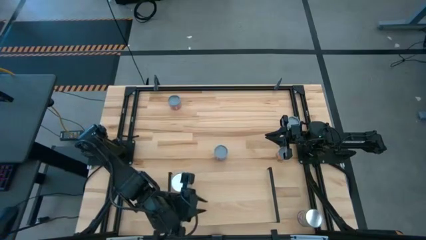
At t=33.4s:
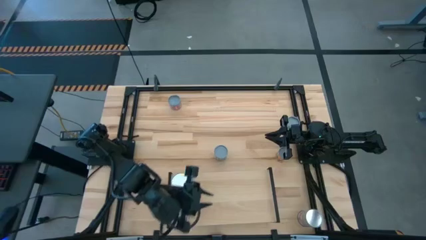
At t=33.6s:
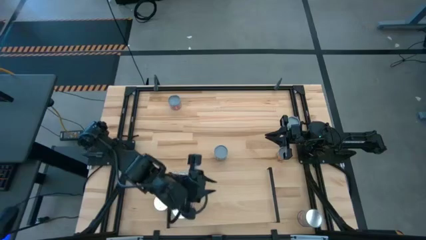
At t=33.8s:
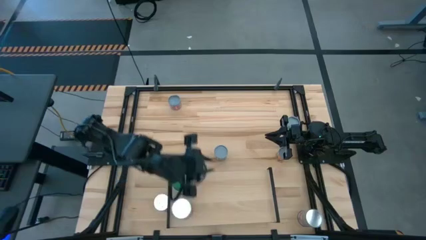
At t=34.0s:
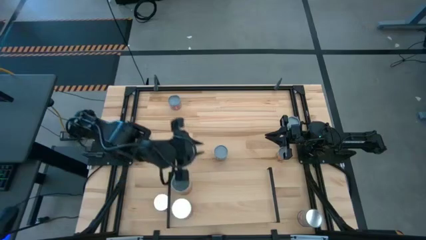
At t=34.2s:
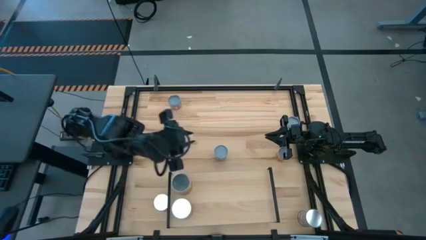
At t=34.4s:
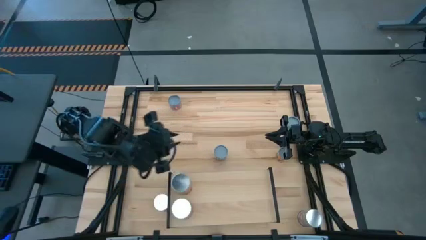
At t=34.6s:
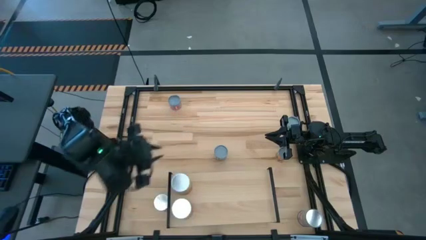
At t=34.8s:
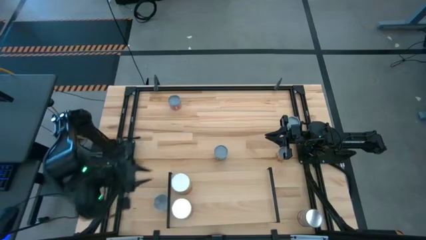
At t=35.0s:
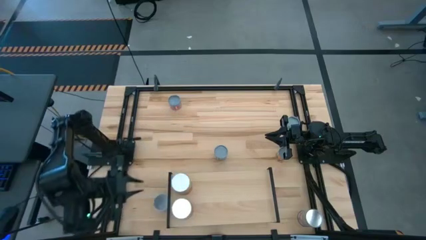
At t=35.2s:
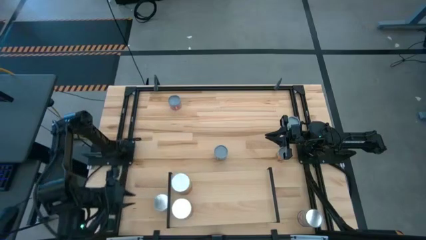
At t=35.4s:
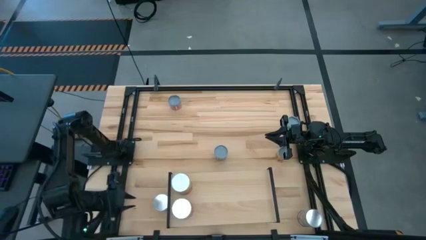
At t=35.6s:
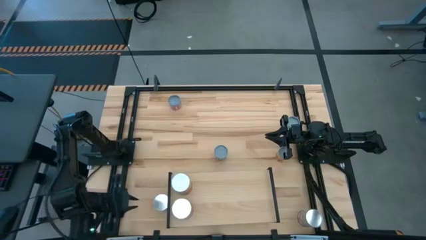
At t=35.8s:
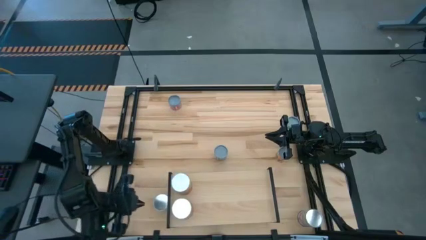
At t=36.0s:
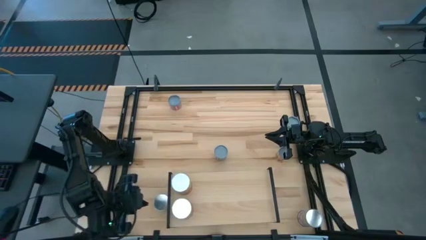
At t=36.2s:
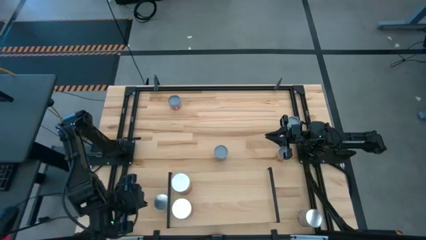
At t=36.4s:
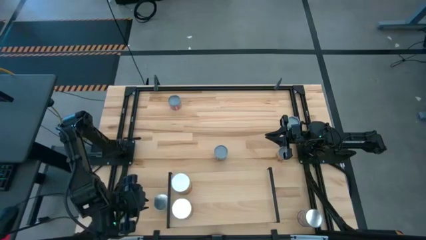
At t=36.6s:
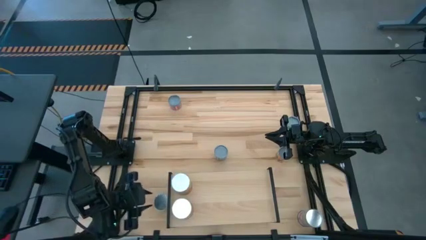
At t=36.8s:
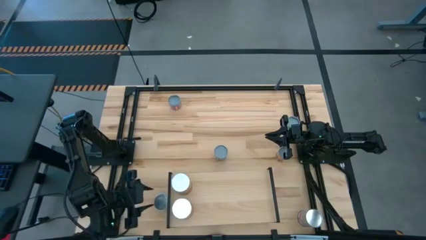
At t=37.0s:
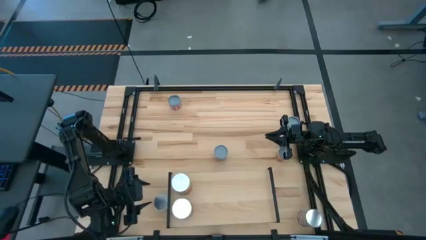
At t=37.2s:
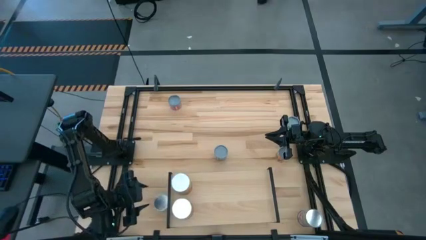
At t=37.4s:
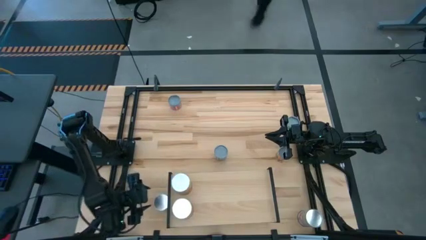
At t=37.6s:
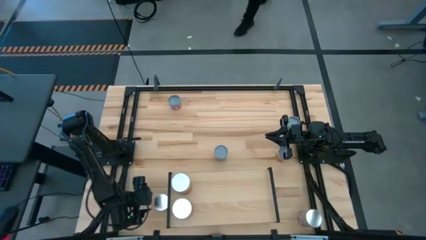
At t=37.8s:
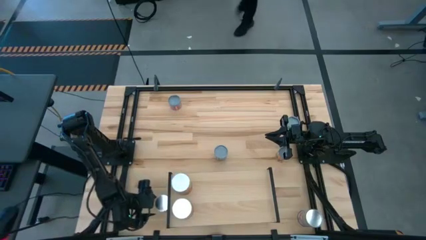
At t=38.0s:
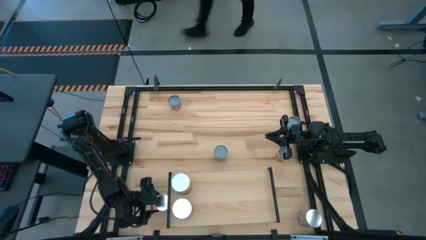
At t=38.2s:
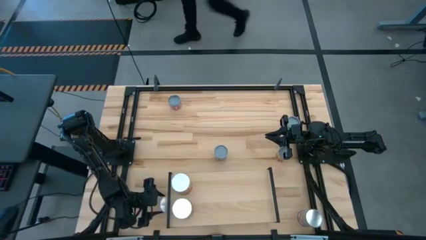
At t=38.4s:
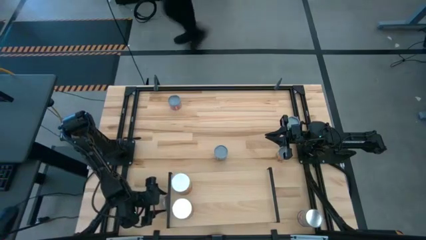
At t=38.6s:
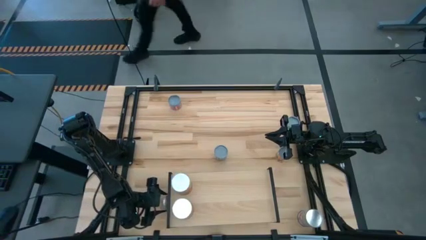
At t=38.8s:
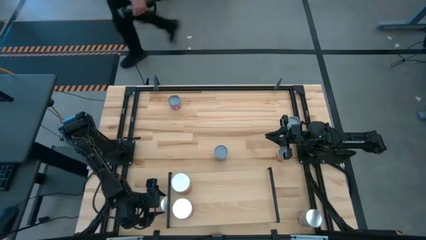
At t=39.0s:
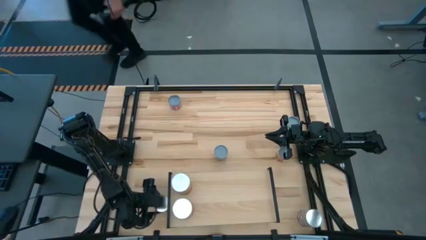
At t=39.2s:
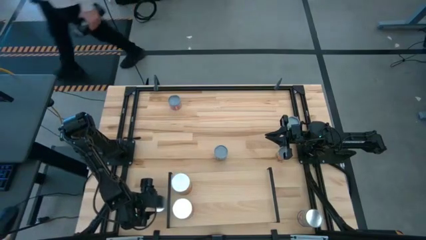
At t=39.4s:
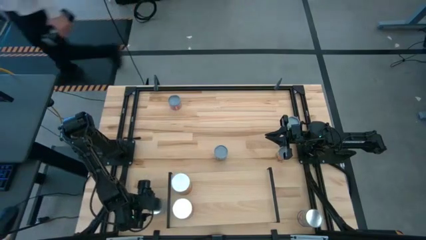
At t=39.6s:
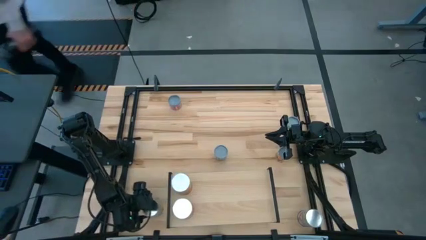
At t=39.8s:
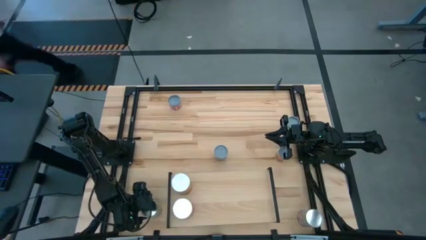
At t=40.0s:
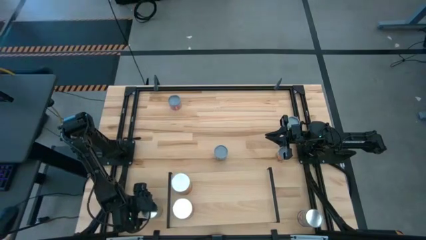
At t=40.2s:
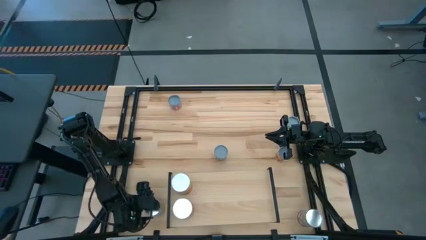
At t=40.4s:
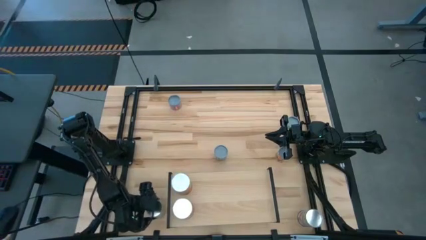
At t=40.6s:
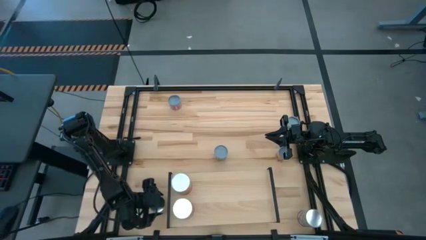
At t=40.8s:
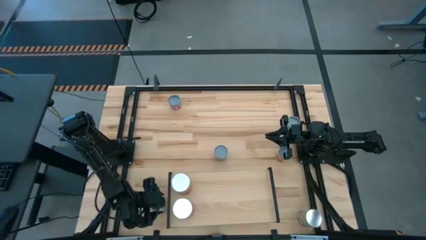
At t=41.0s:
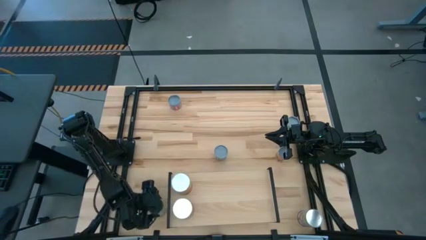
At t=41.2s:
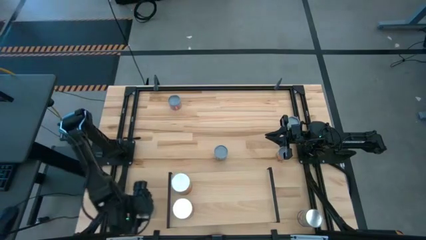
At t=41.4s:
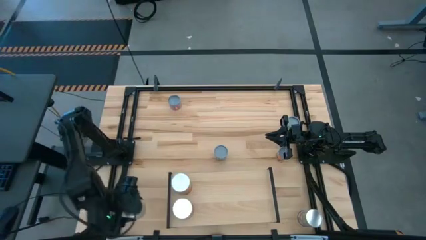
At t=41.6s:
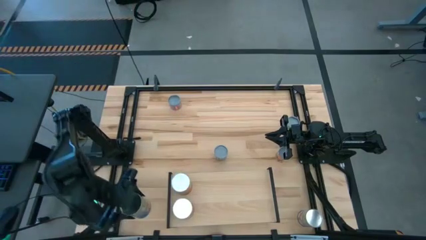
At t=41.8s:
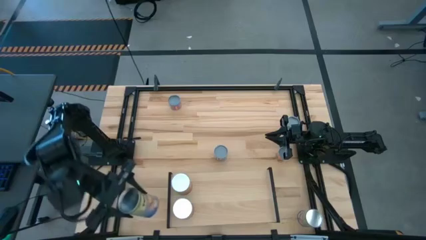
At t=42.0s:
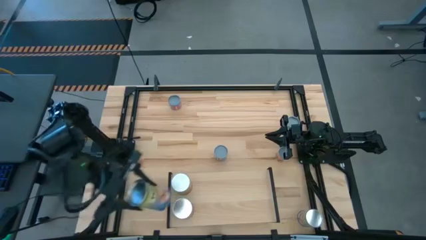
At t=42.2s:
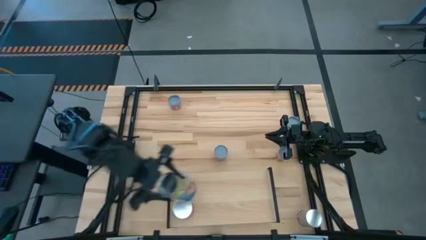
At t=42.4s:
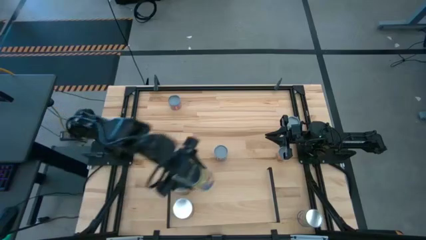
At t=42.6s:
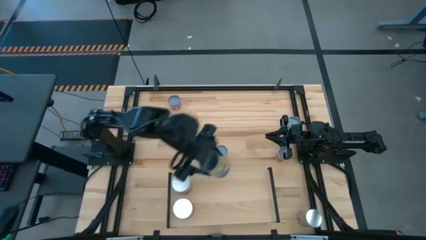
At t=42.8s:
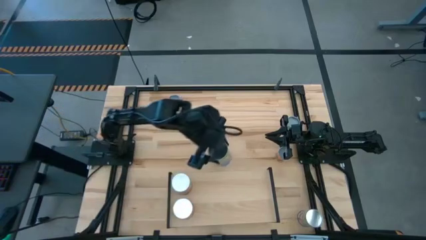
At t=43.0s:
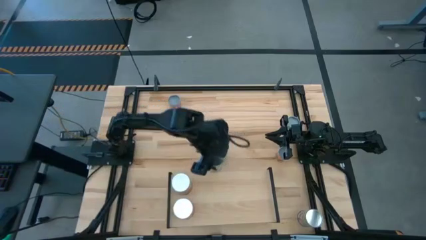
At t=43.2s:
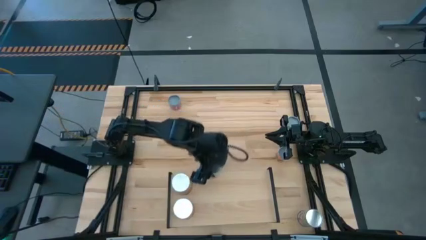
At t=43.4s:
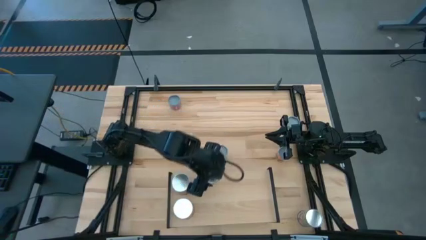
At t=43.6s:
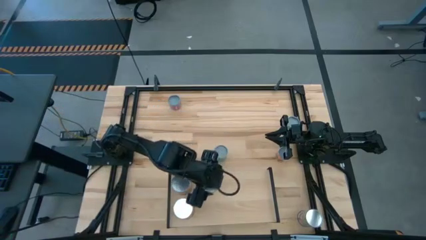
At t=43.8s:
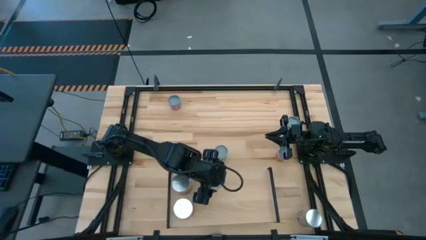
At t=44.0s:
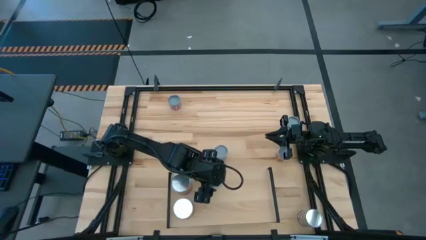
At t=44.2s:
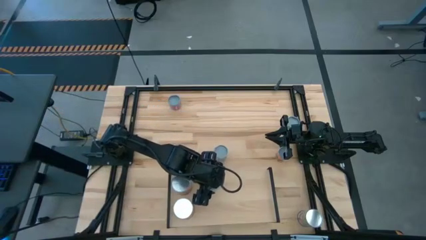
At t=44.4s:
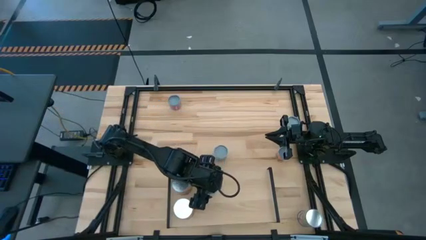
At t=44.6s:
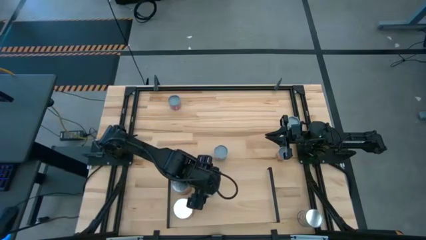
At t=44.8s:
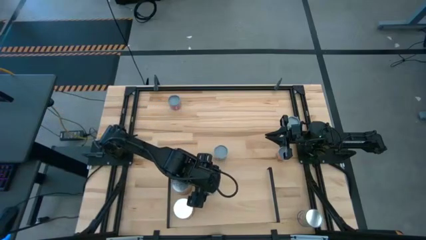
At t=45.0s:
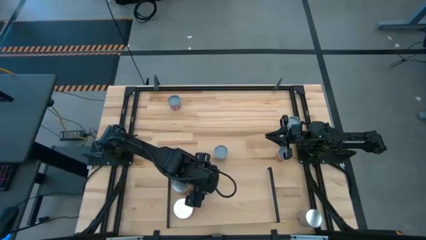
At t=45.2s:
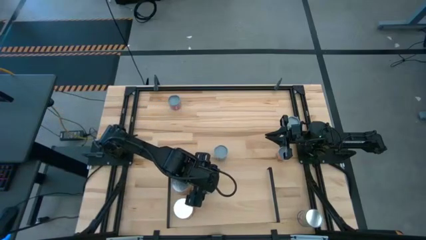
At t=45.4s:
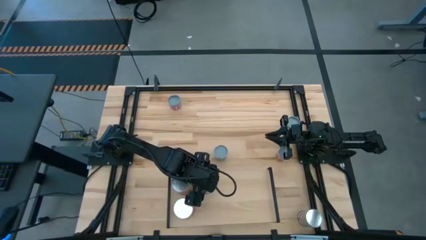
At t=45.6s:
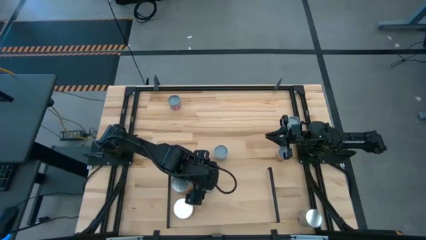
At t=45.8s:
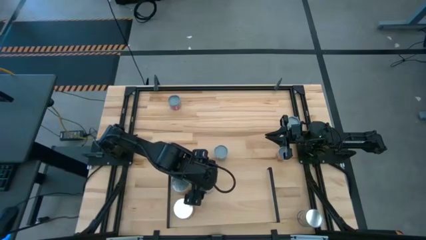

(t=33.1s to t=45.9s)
Task: Pick and place cans onto a shelf
Put the left canned peaches on the shelf

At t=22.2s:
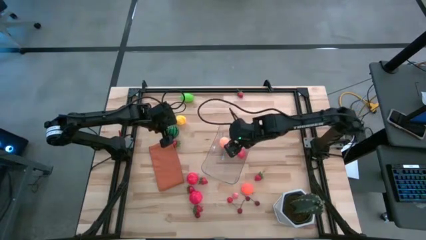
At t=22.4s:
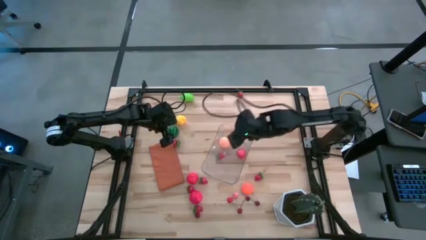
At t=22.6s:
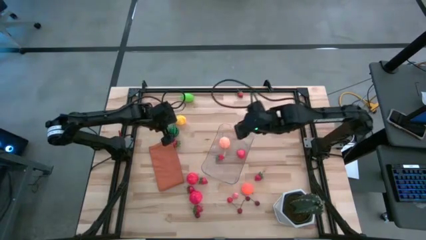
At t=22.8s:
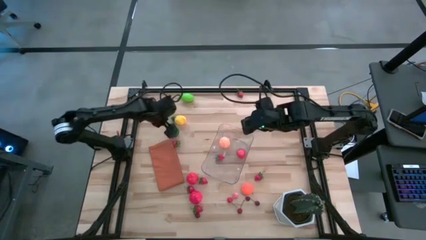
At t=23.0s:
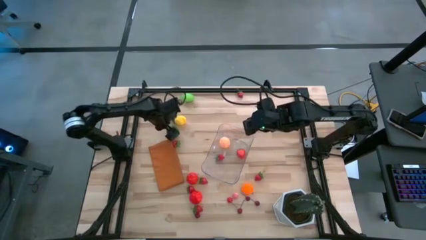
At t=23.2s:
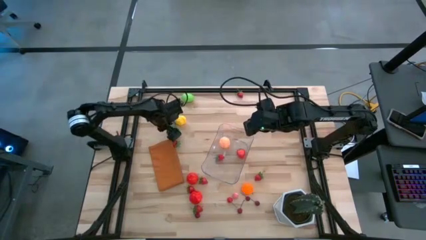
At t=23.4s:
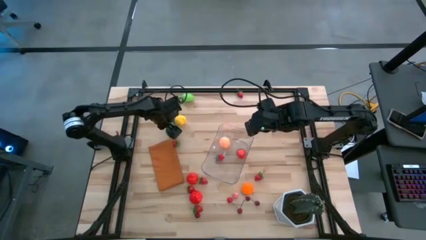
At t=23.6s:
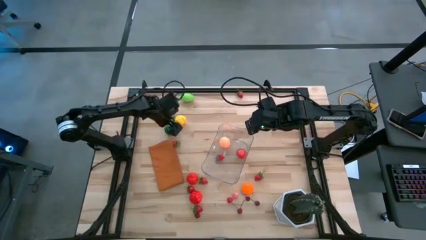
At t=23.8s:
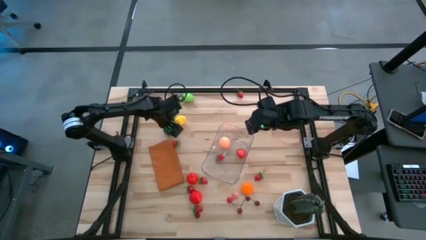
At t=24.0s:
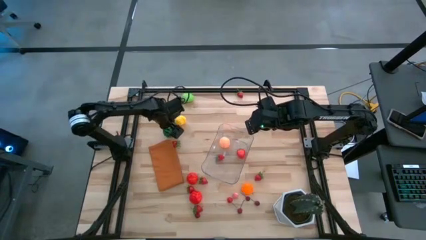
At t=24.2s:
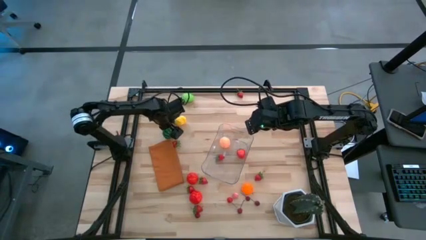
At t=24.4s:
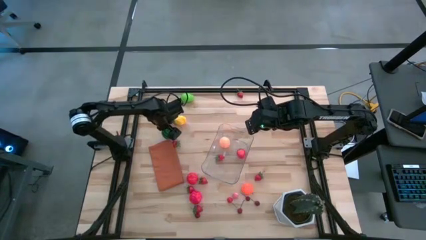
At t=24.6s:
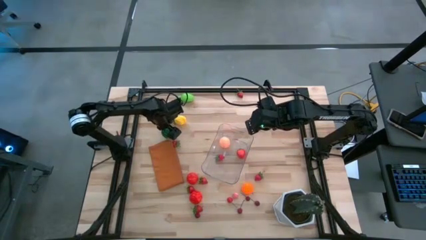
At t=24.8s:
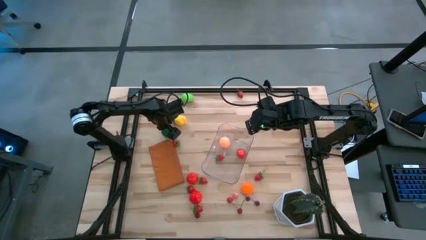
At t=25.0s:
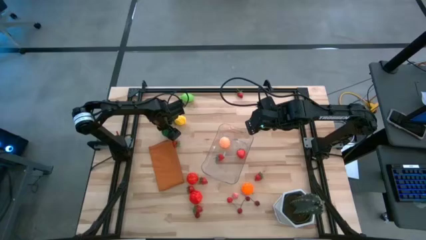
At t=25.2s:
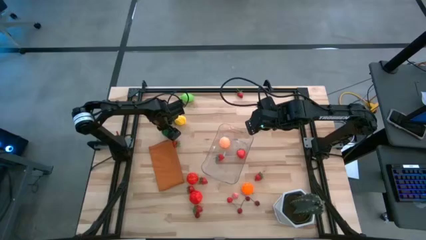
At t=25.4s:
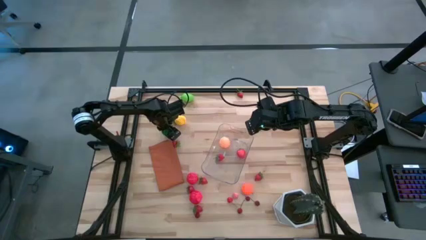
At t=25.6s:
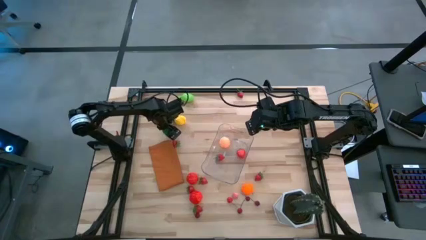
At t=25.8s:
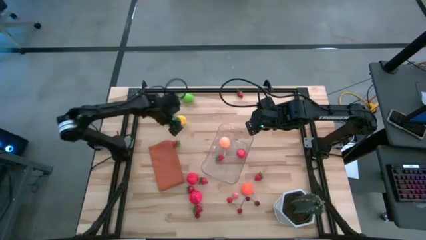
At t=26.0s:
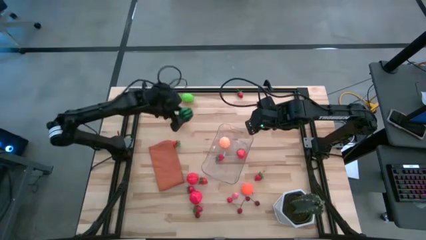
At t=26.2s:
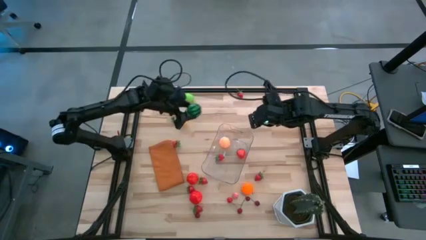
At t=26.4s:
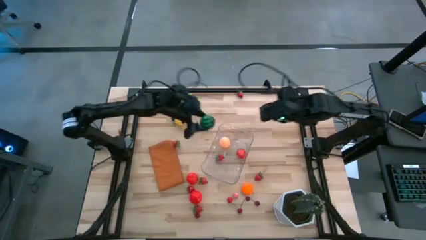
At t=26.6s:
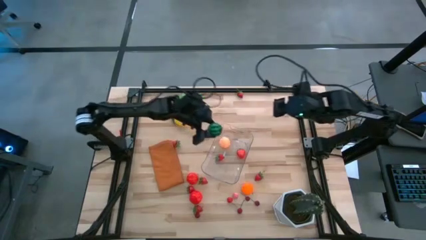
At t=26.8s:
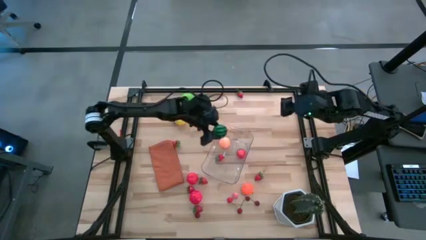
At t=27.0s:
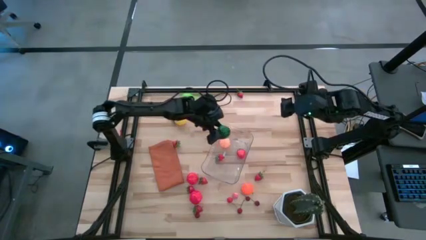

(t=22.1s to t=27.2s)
Task: Pick and placing Produce into tupperware
Put the green watermelon into the transparent bin
